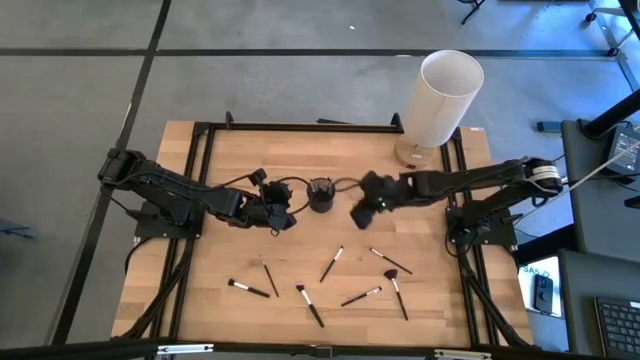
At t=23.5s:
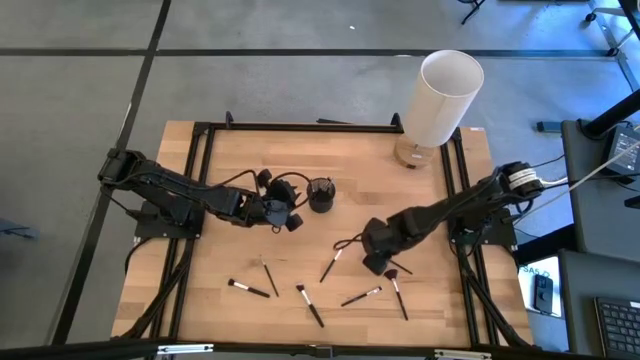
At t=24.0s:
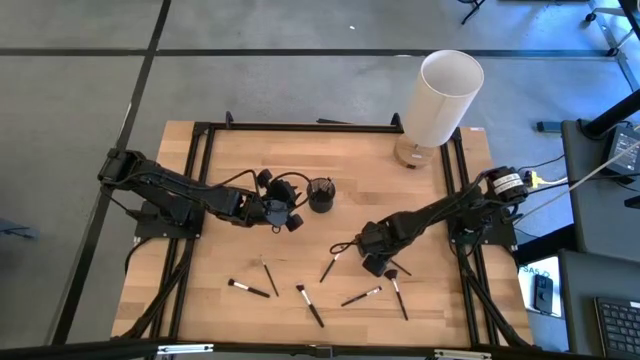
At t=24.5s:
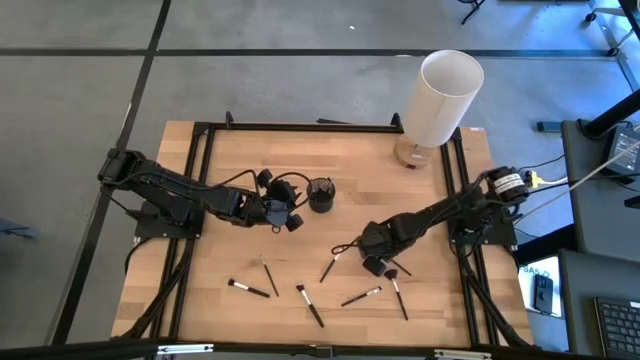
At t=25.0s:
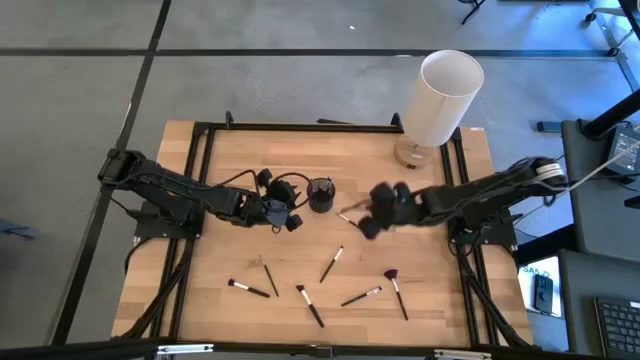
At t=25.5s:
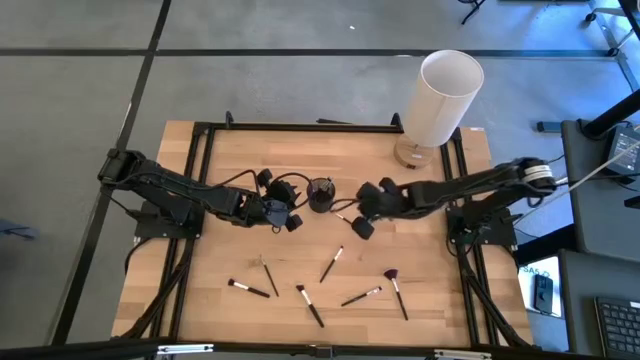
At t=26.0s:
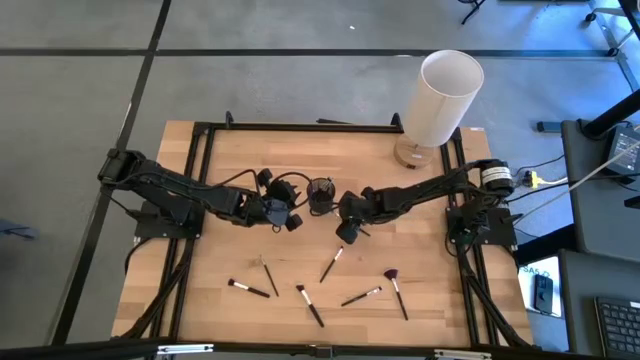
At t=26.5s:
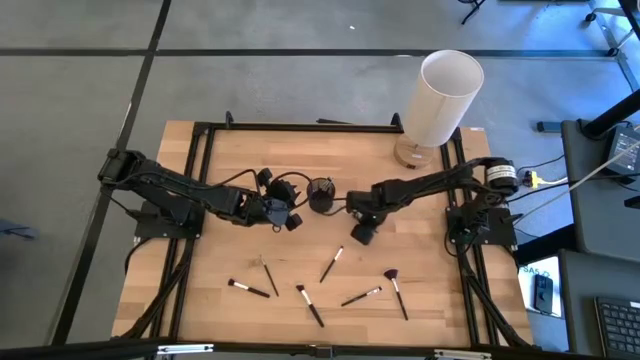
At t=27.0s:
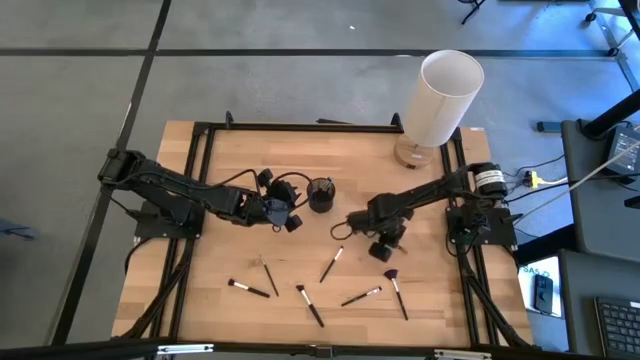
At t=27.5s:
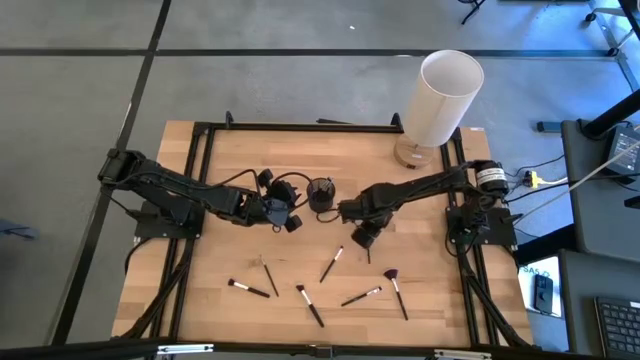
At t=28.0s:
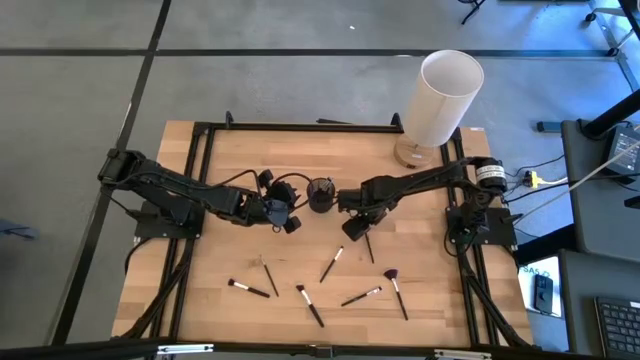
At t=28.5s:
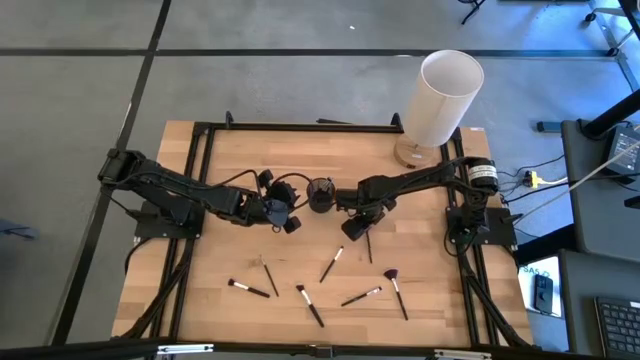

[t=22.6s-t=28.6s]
Task: Sort items
Put the eyeshadow brush into the organizer

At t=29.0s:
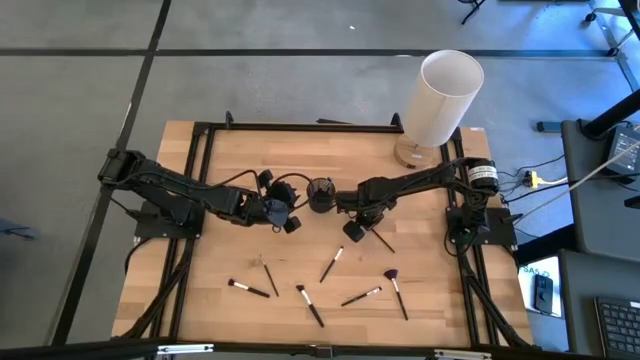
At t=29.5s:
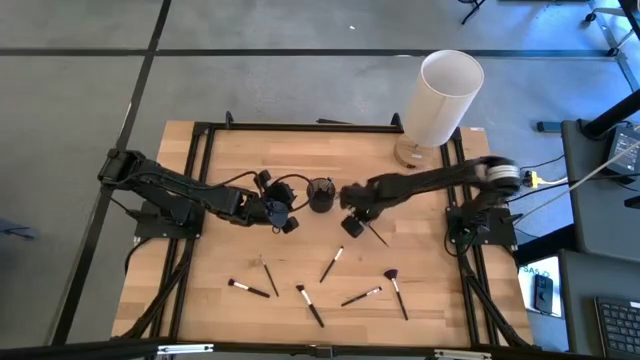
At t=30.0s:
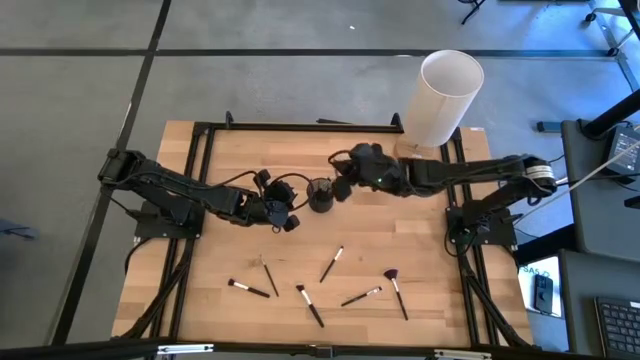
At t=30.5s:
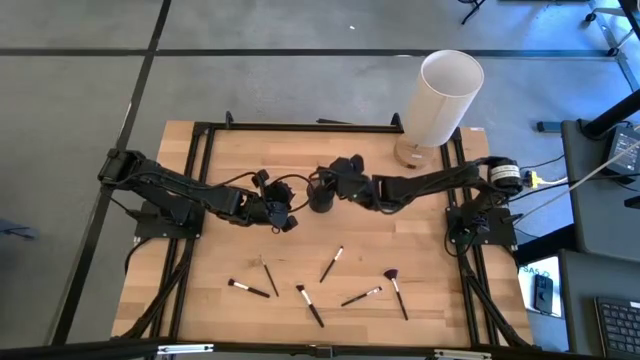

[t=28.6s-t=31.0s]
Put the eyeshadow brush into the organizer

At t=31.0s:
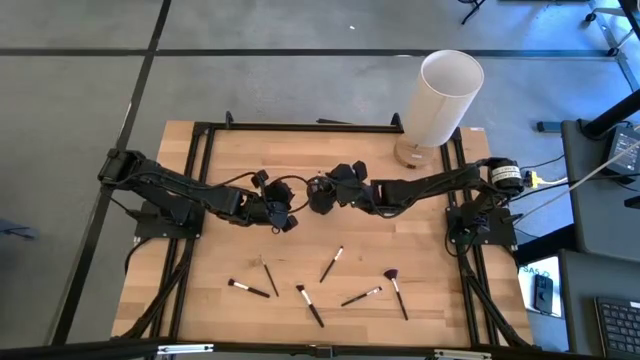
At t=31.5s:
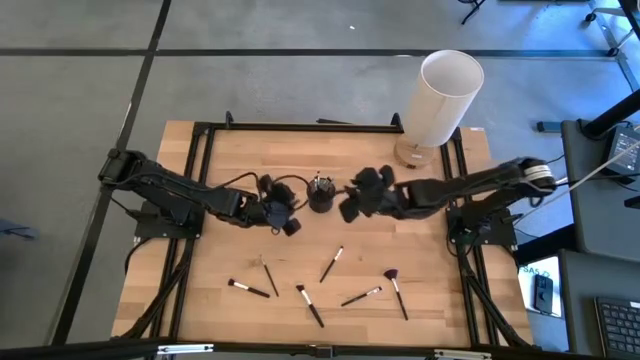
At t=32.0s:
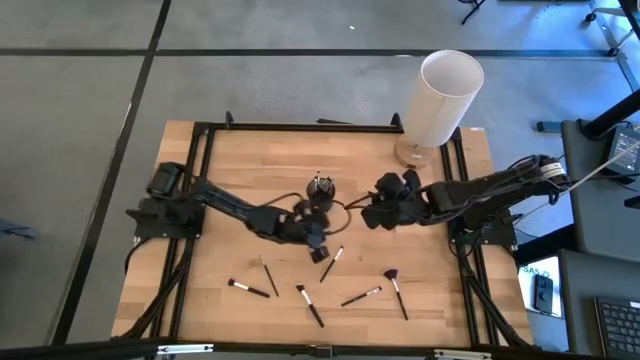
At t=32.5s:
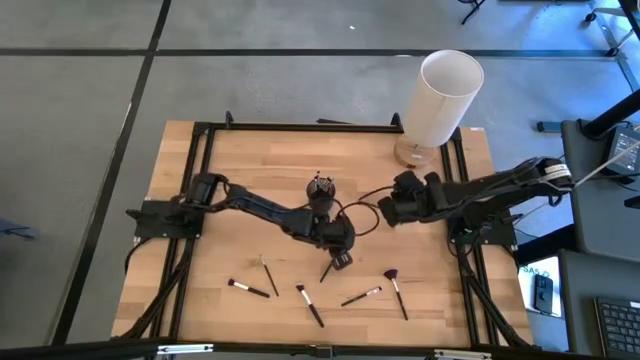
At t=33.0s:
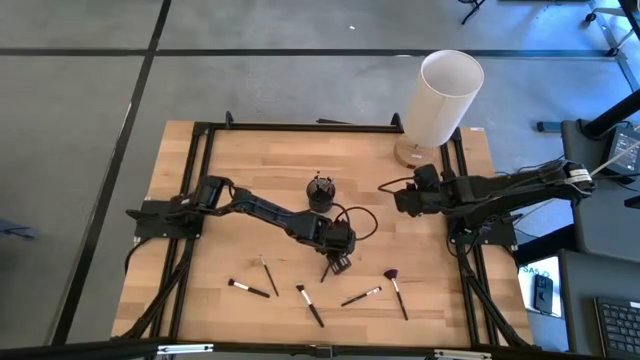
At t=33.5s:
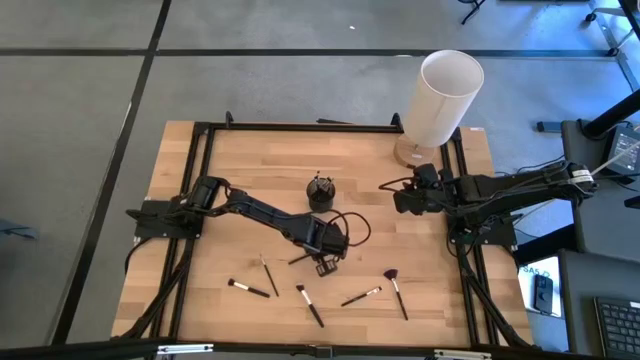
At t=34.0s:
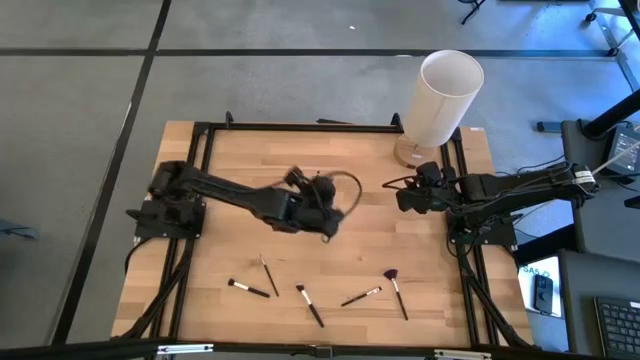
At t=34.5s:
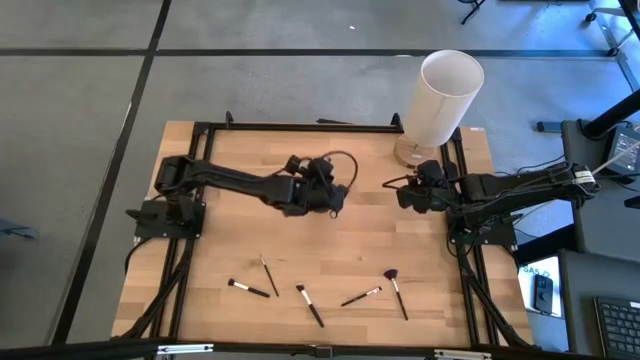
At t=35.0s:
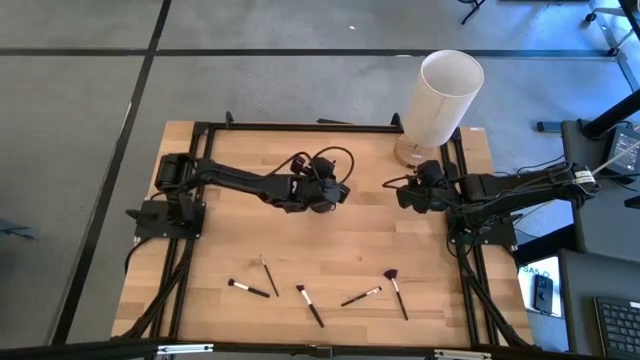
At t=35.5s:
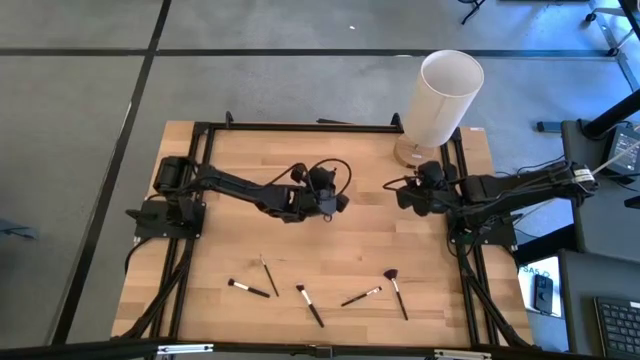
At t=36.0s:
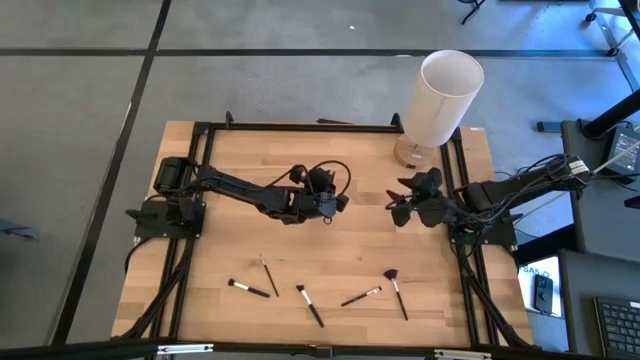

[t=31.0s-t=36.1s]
Put the eyeshadow brush into the organizer

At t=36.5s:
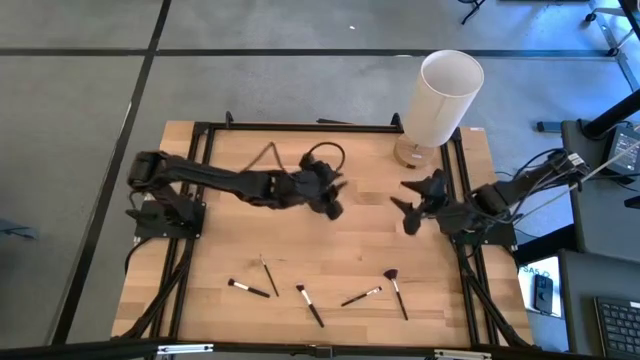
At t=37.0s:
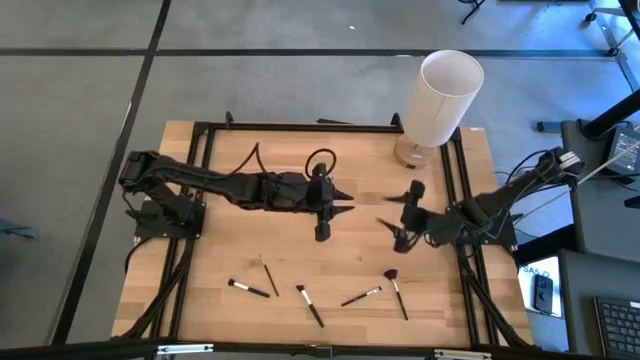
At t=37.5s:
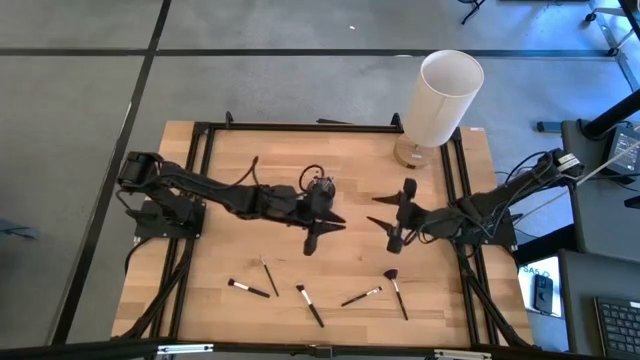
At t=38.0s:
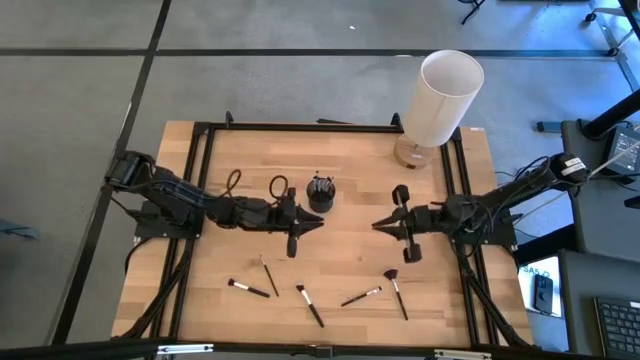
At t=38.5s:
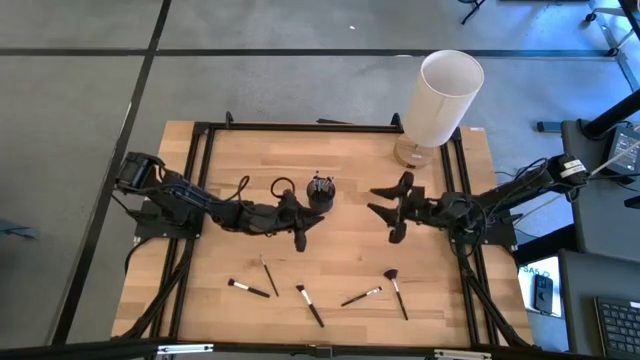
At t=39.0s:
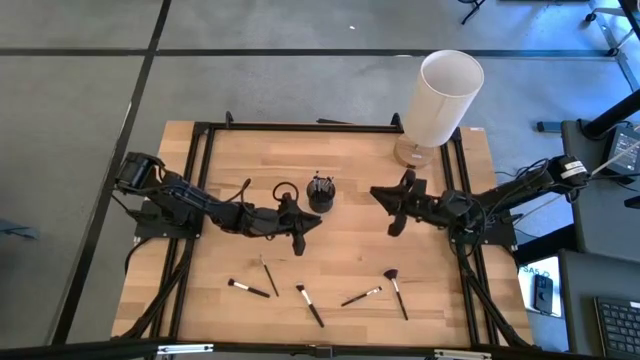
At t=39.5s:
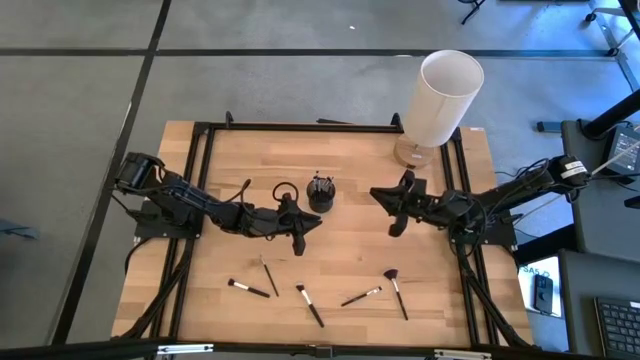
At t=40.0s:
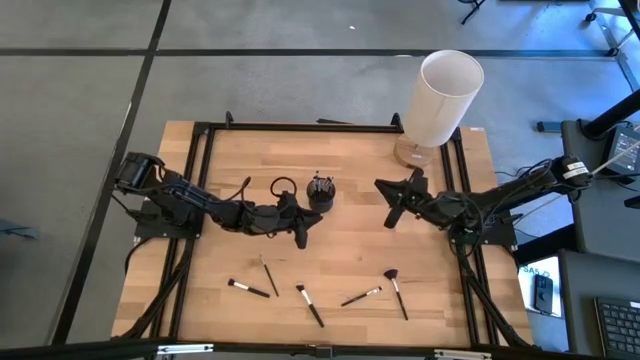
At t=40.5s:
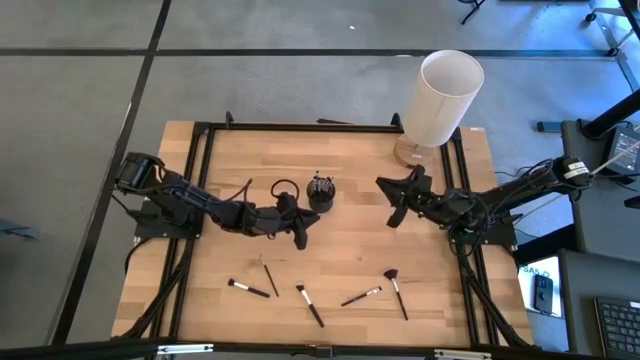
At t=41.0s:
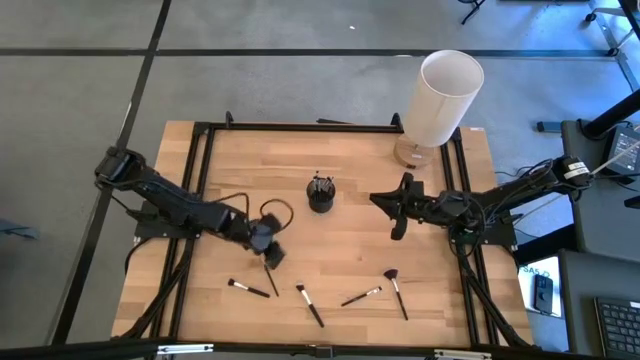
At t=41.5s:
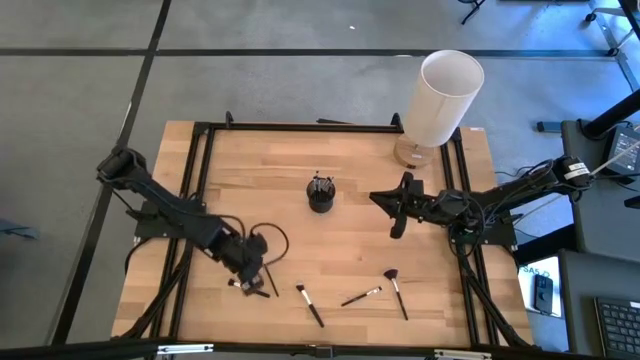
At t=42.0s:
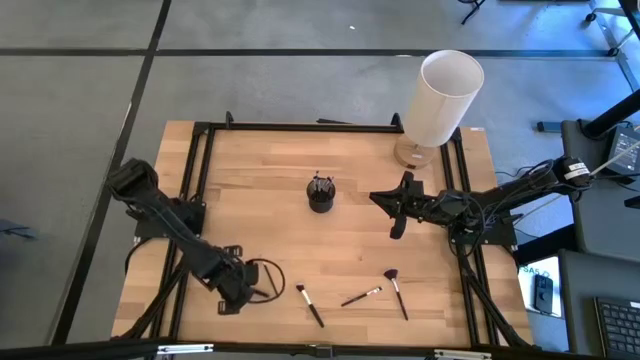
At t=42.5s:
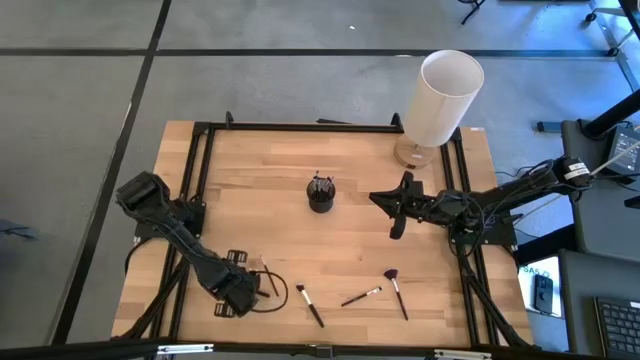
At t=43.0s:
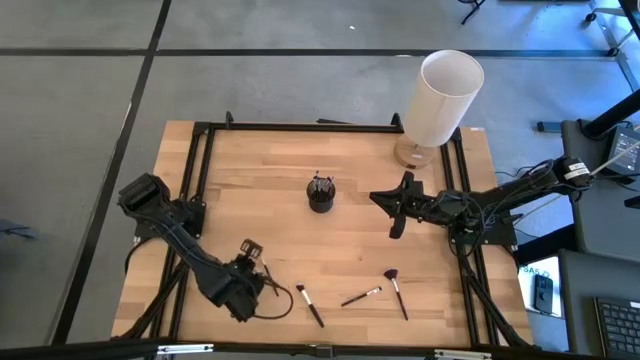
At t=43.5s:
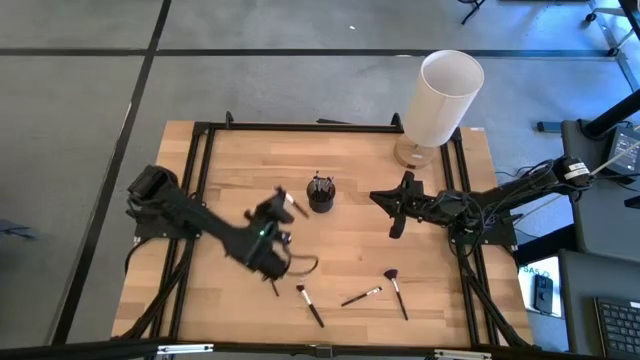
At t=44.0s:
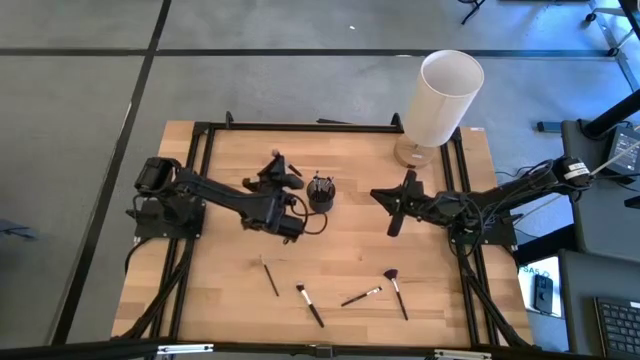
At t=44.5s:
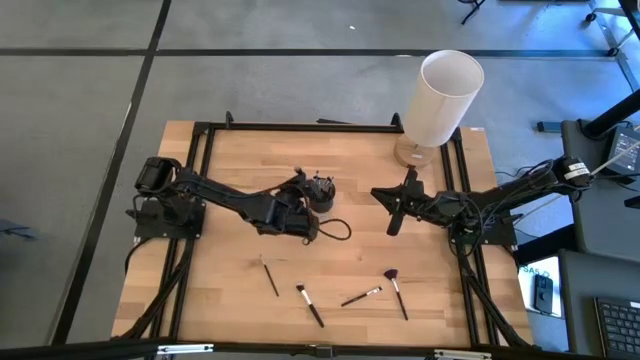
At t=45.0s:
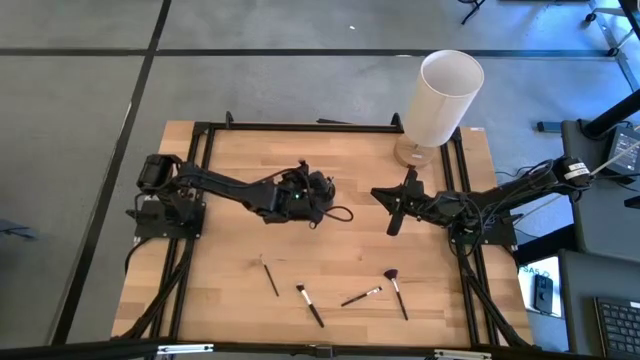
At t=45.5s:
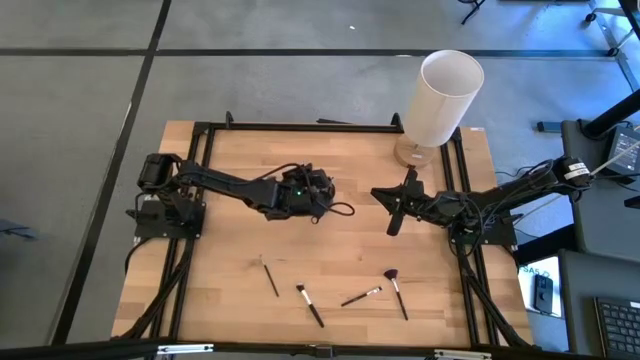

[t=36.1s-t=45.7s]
Put the powder brush into the organizer
